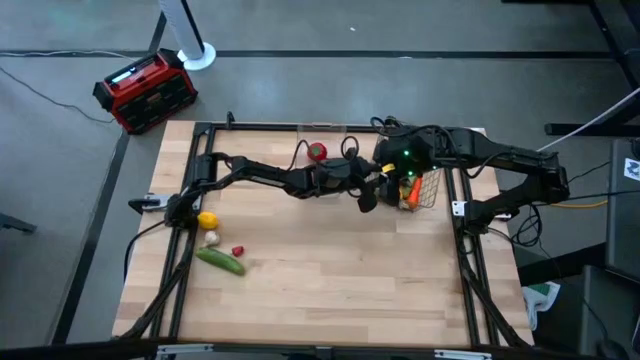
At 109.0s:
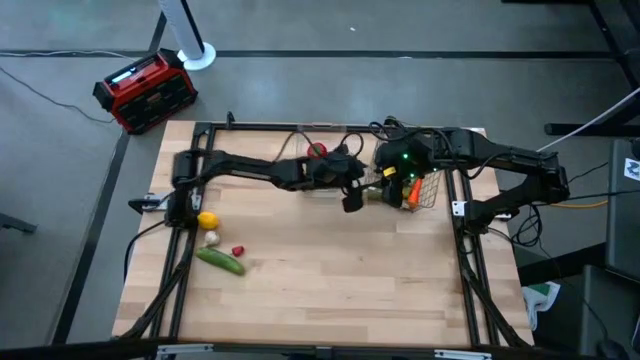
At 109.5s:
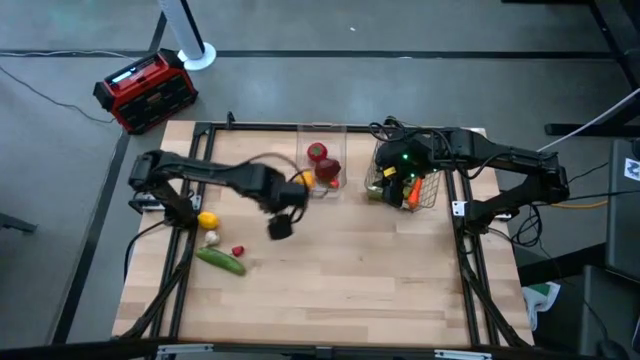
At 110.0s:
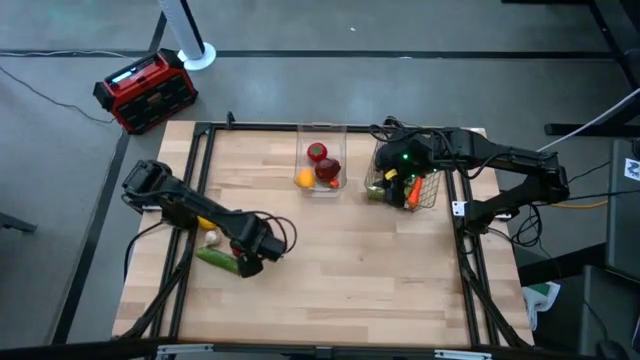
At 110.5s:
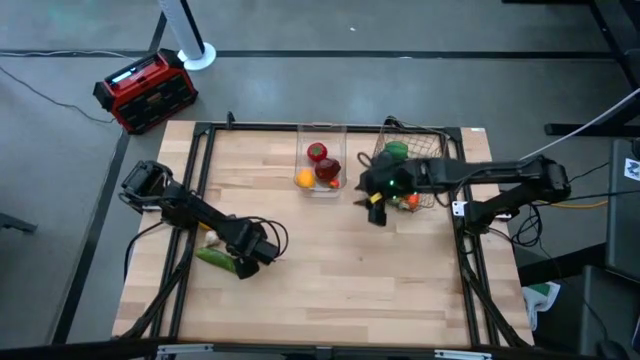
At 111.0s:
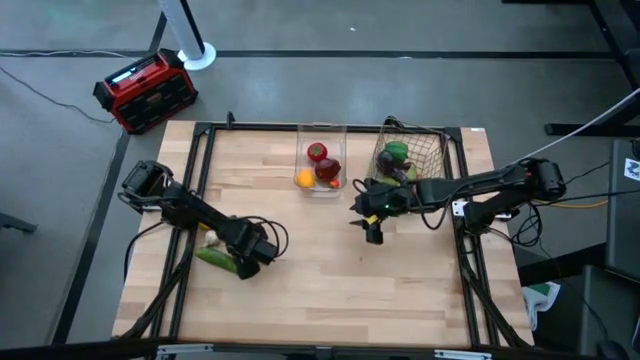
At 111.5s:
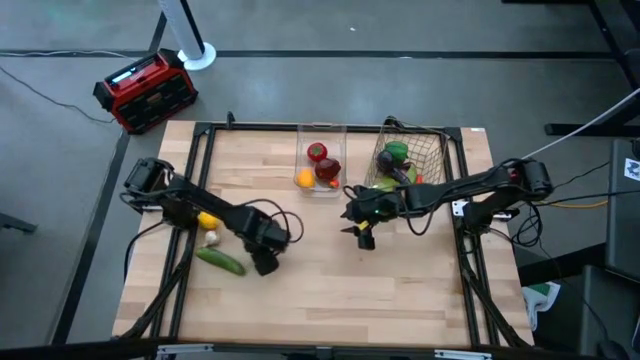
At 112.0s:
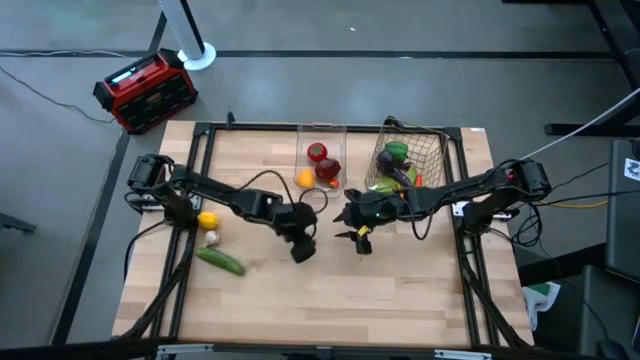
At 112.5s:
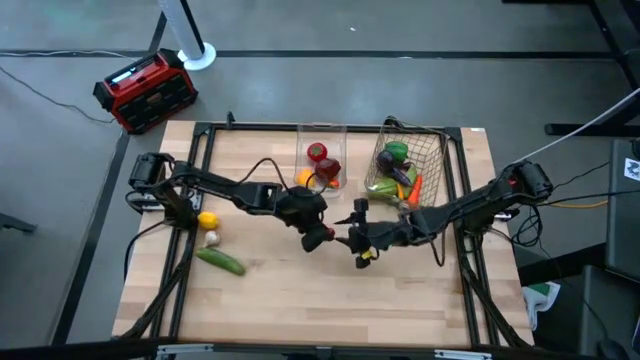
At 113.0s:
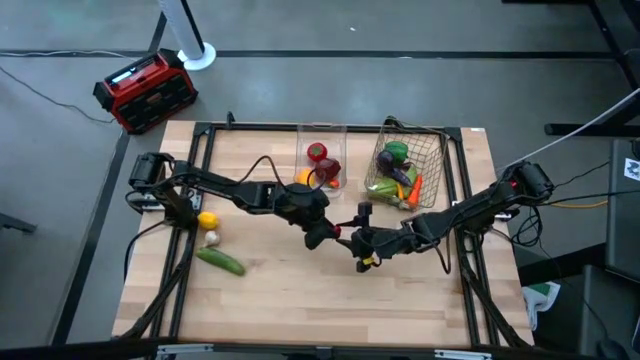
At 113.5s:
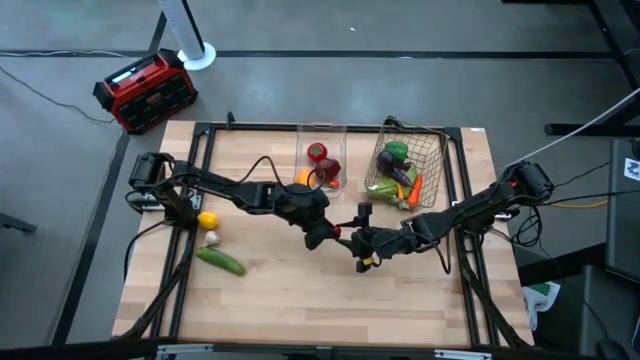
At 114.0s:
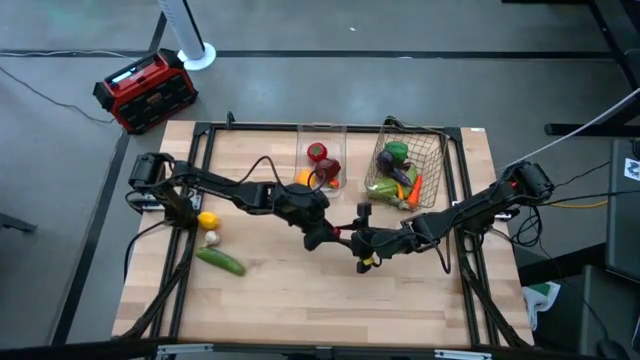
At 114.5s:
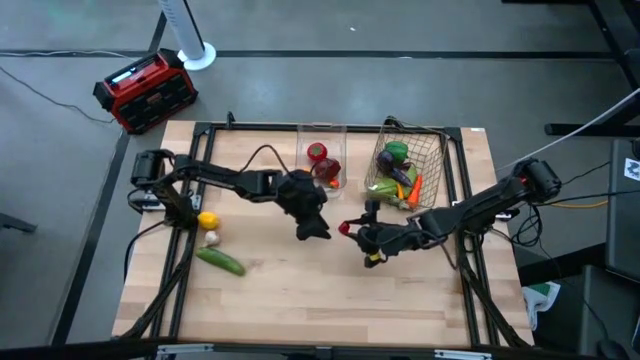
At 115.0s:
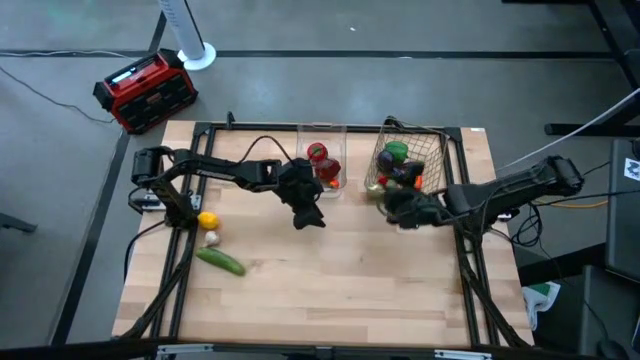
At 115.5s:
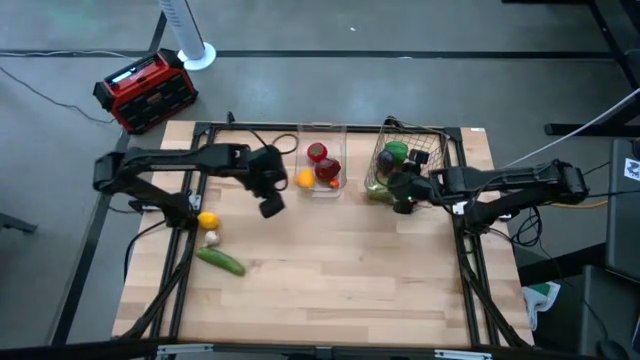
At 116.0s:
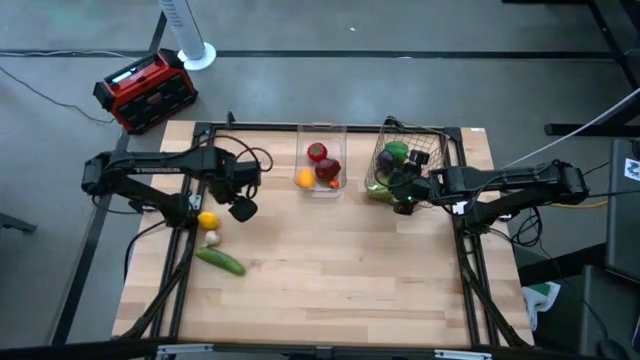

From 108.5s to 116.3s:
Task: Sort produce into baskets
Put the red chili pepper into the wire basket

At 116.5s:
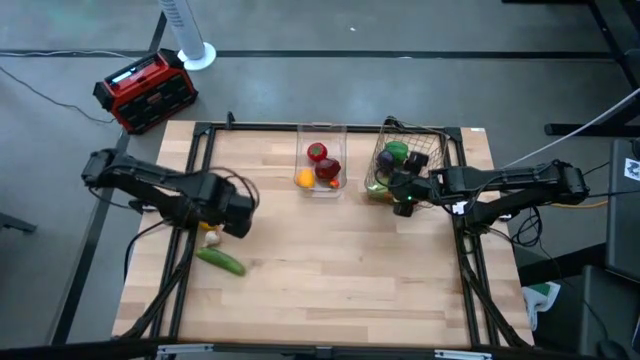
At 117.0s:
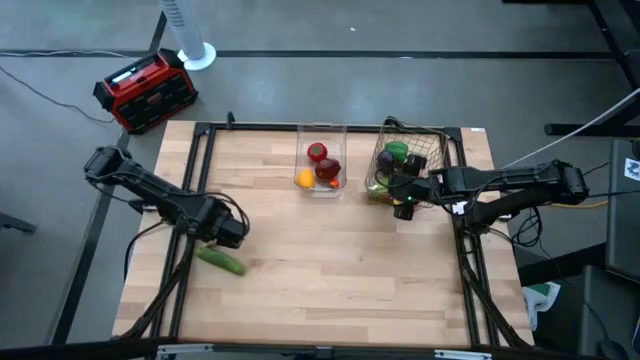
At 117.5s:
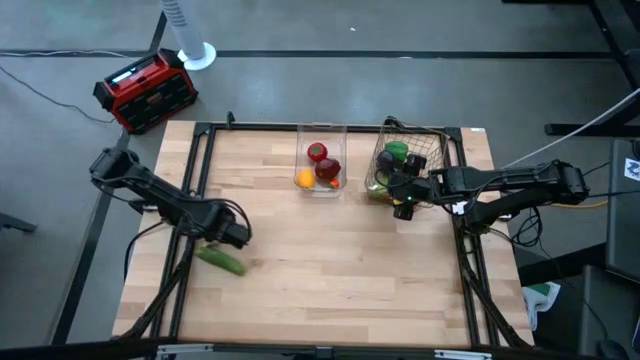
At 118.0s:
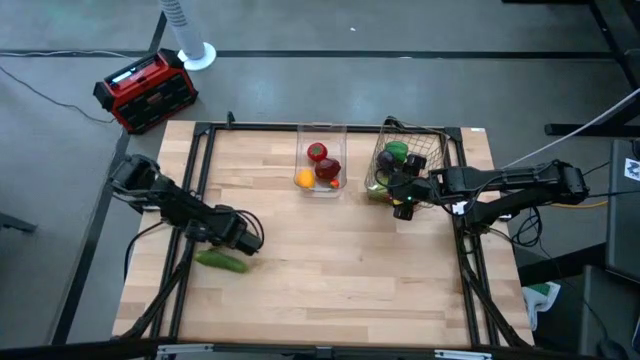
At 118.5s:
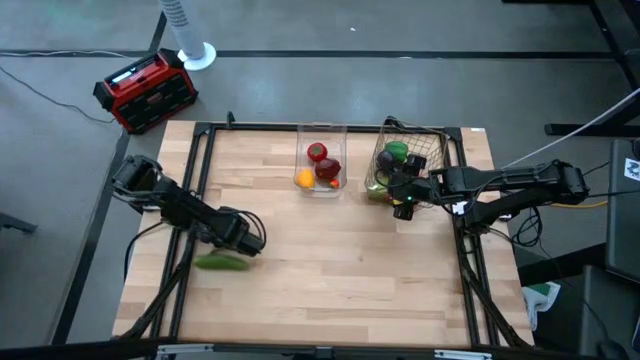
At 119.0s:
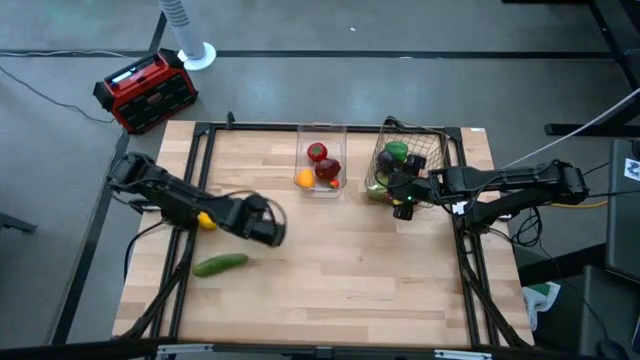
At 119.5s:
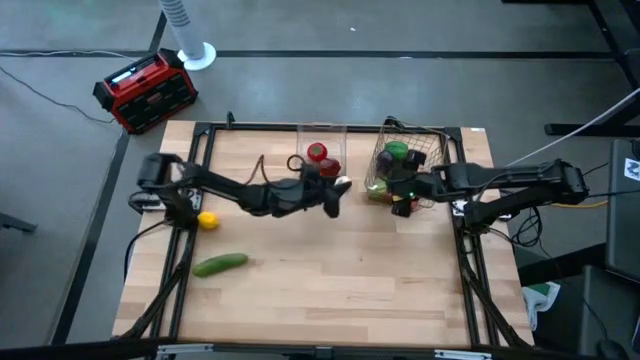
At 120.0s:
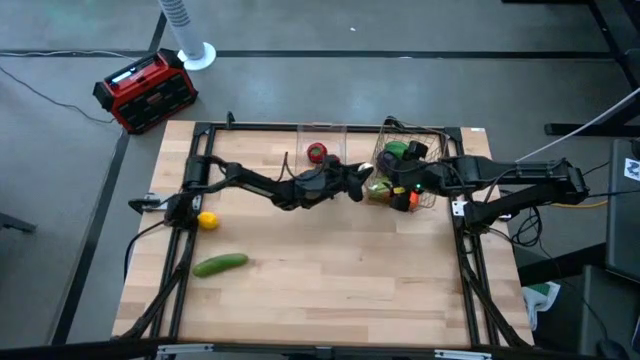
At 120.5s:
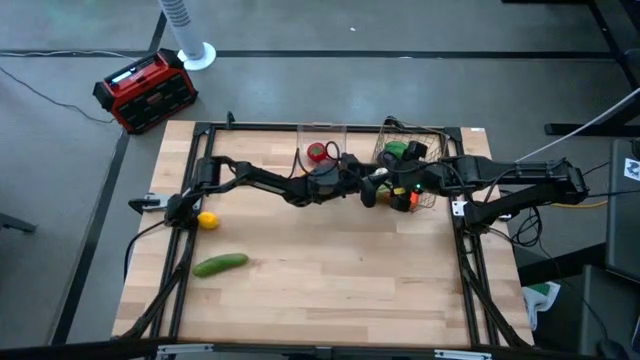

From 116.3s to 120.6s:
Put the white garlic into the wire basket

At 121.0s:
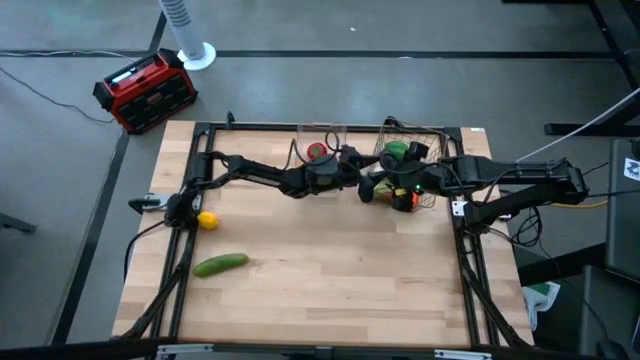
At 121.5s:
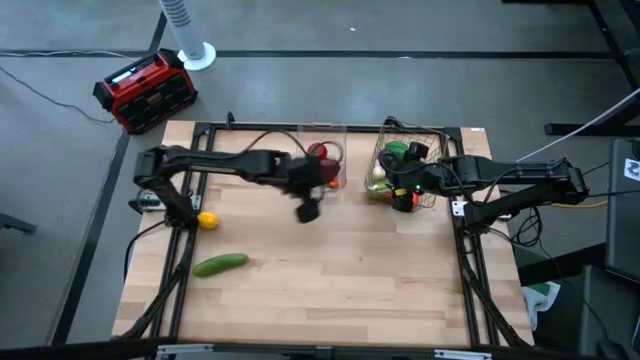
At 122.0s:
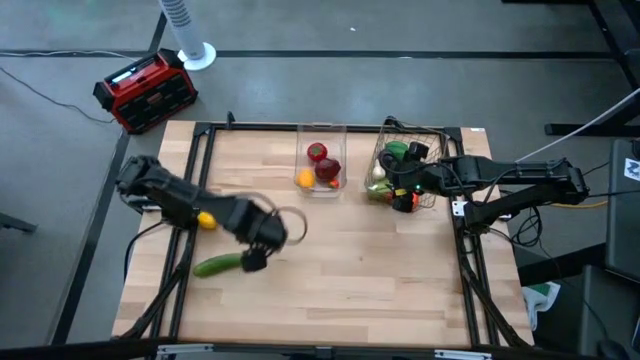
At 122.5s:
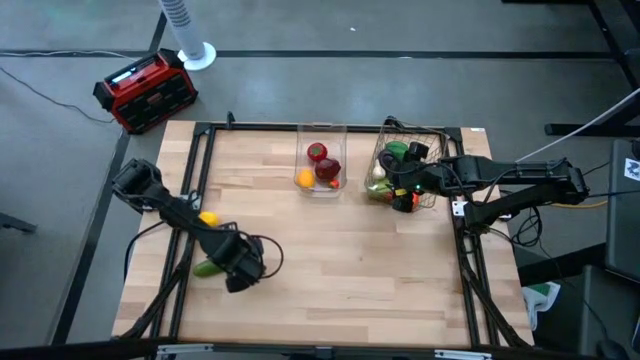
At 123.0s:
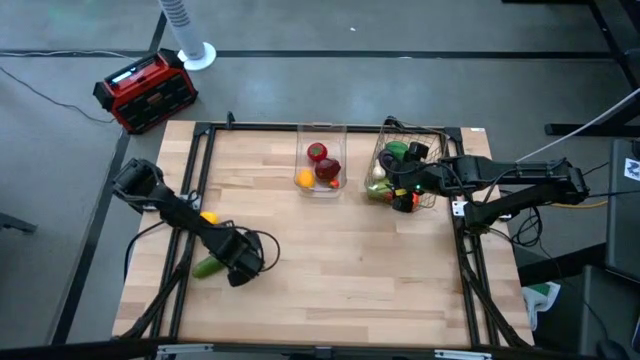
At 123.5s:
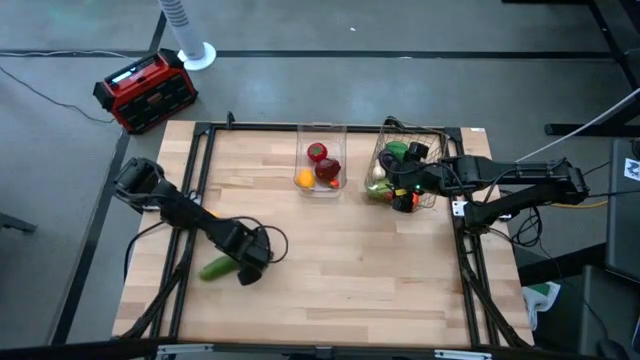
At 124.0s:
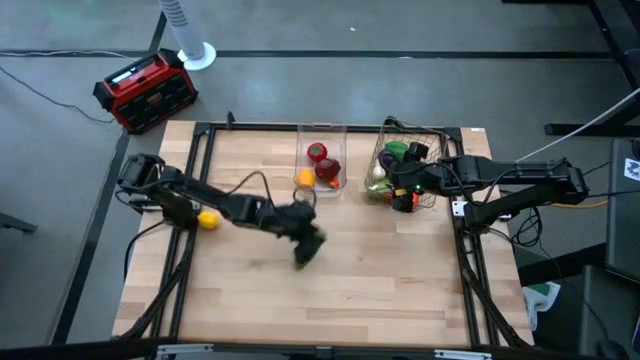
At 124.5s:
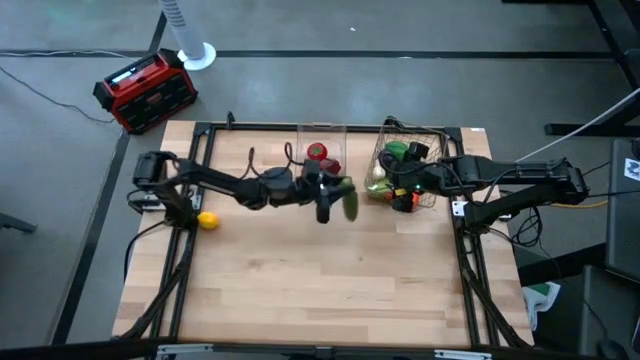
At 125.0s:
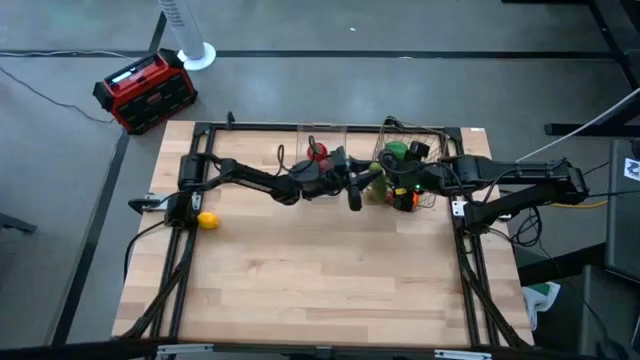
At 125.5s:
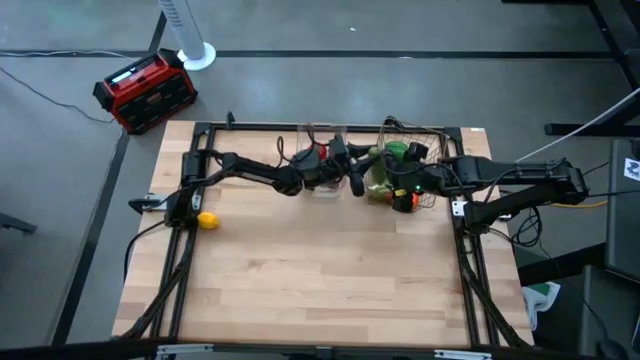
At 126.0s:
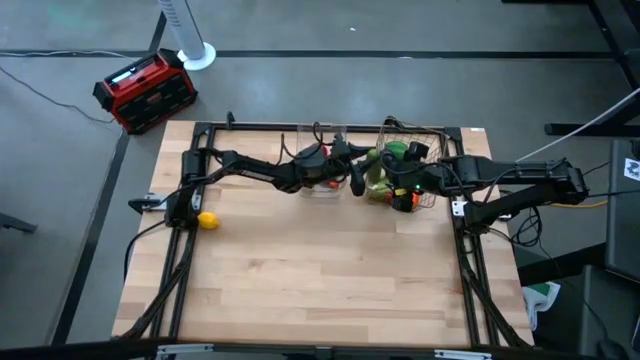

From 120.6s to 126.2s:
Put the green cucumber into the wire basket

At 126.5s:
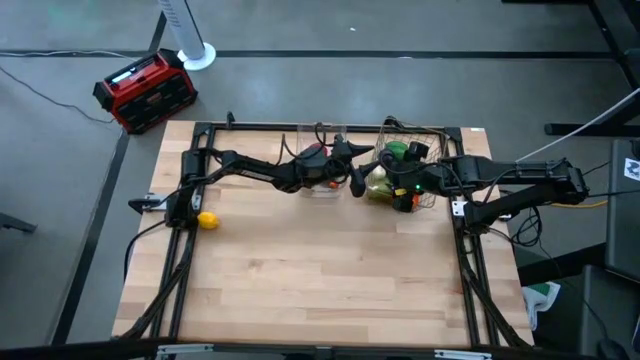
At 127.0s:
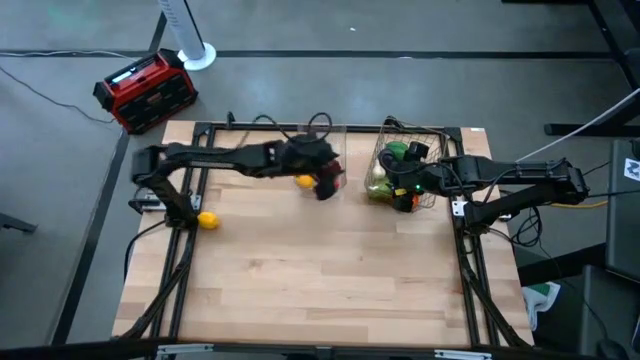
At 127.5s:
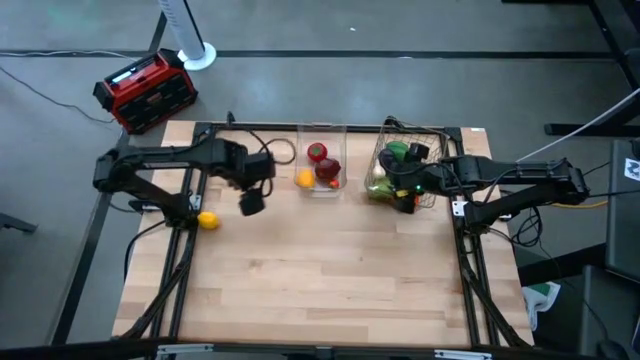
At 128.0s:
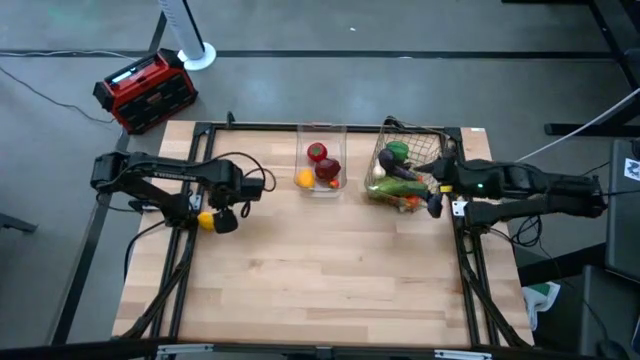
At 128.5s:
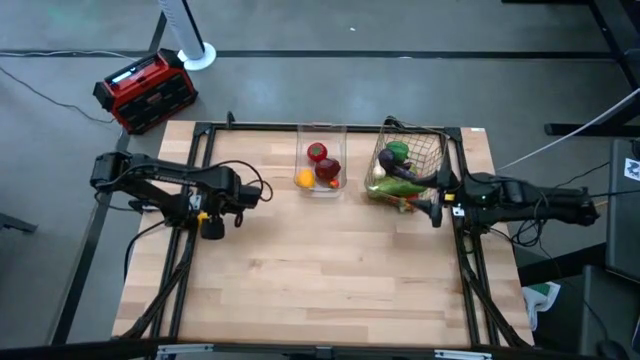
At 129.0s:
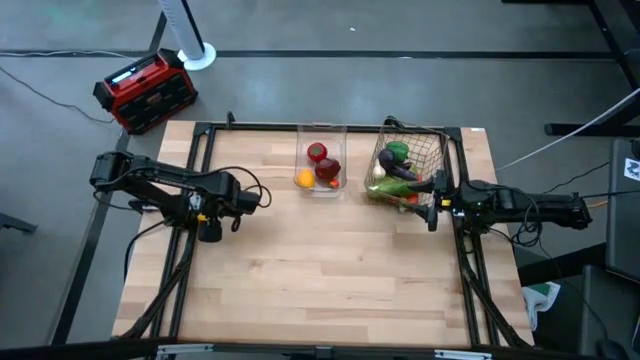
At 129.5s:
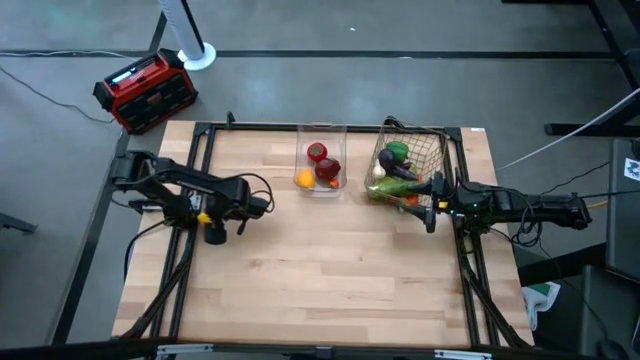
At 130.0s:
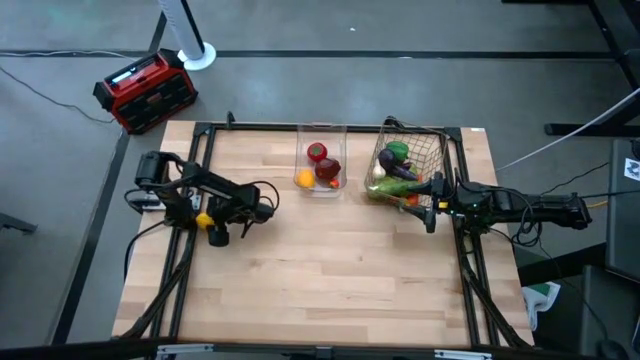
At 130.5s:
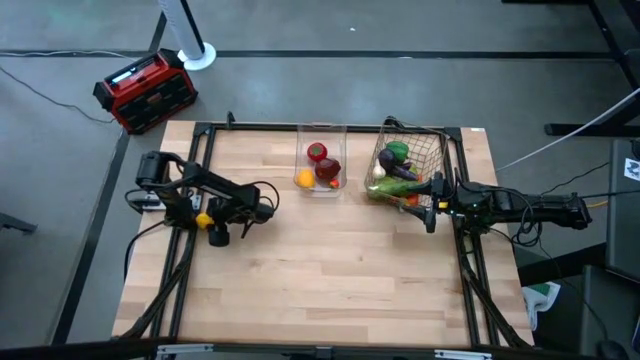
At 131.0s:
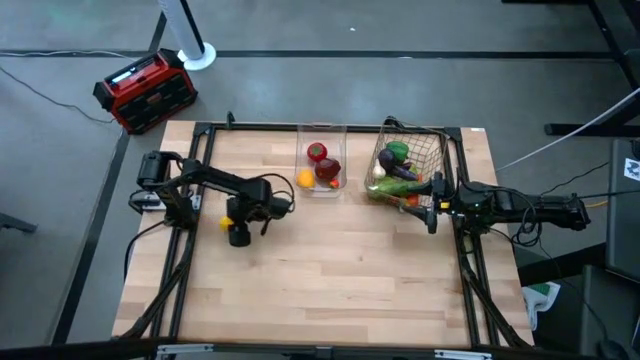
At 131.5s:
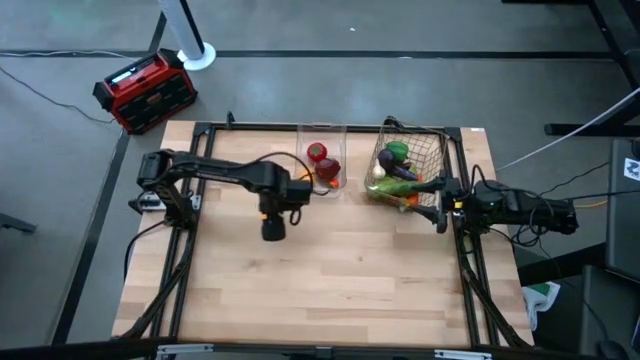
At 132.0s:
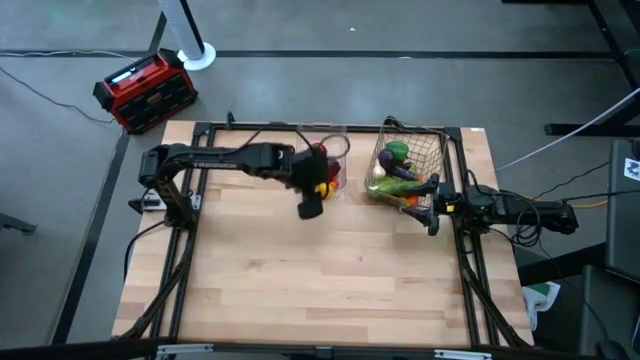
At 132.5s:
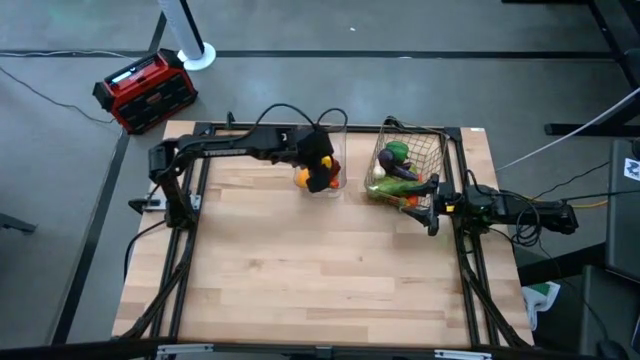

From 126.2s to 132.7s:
Put the yellow lemon into the transparent bin
